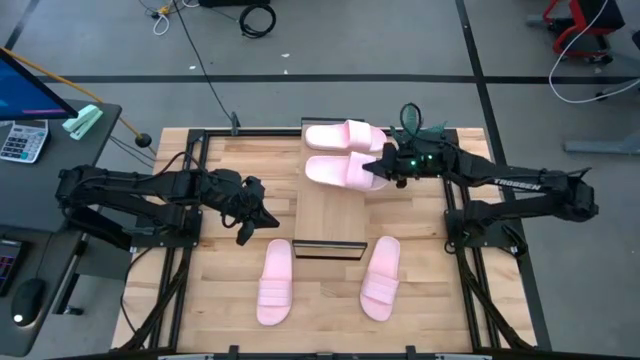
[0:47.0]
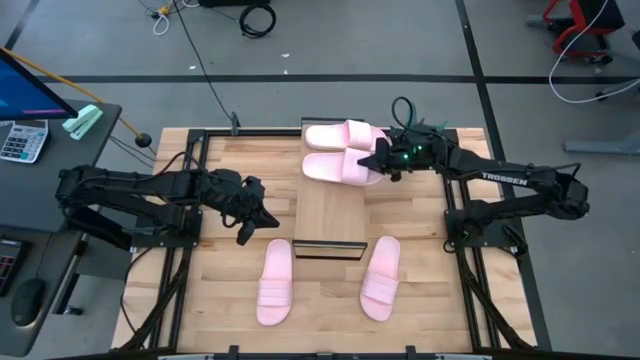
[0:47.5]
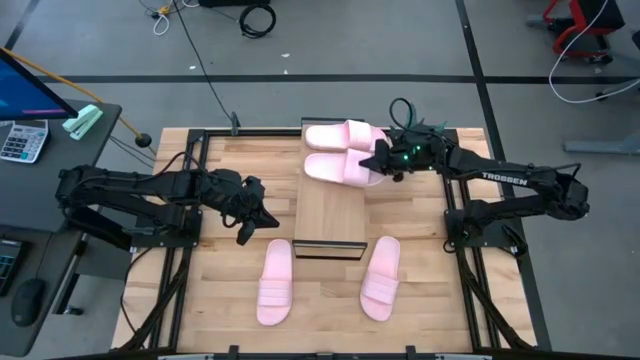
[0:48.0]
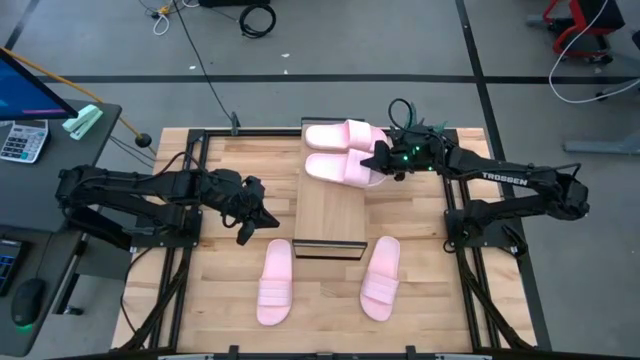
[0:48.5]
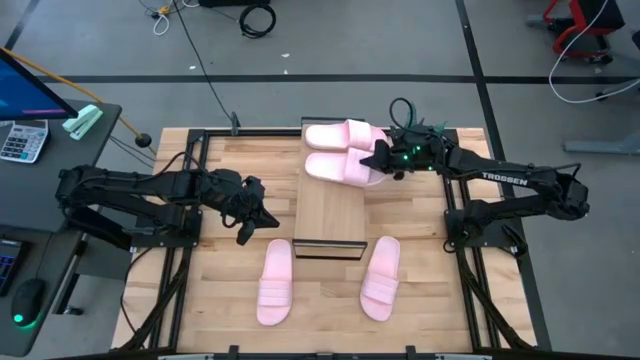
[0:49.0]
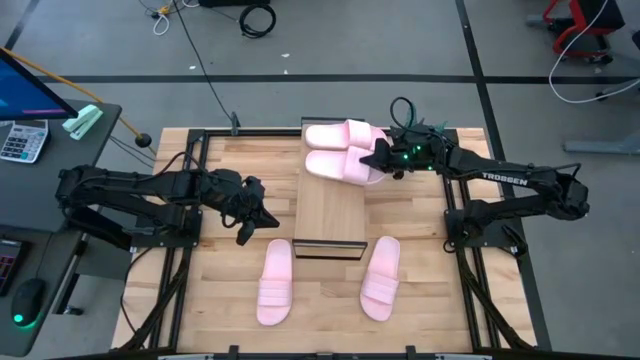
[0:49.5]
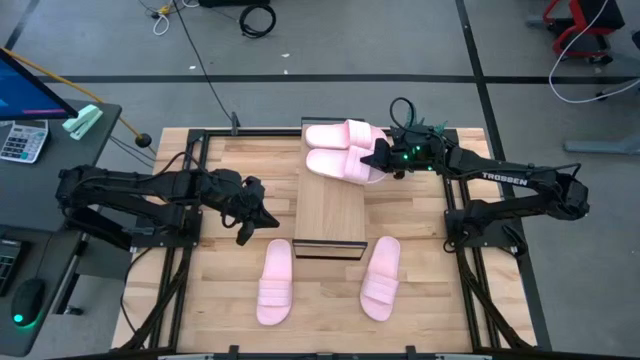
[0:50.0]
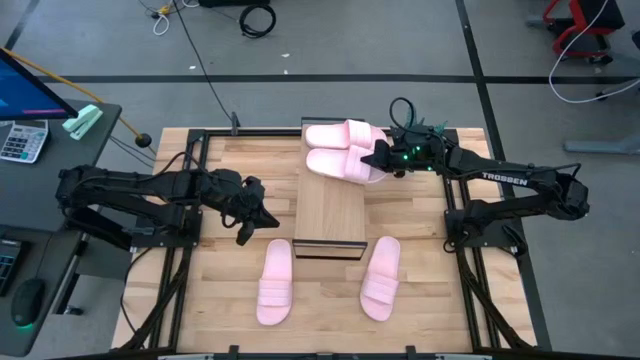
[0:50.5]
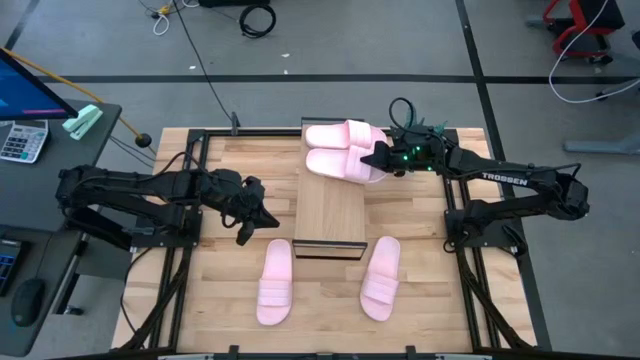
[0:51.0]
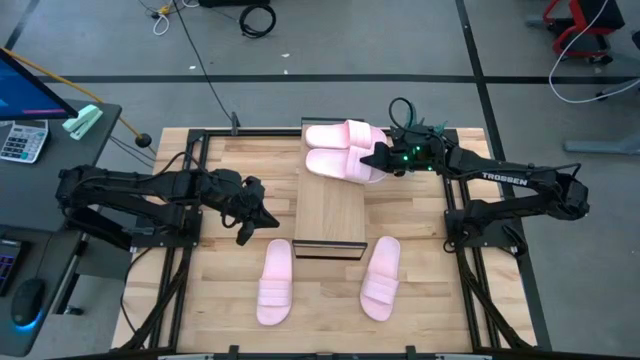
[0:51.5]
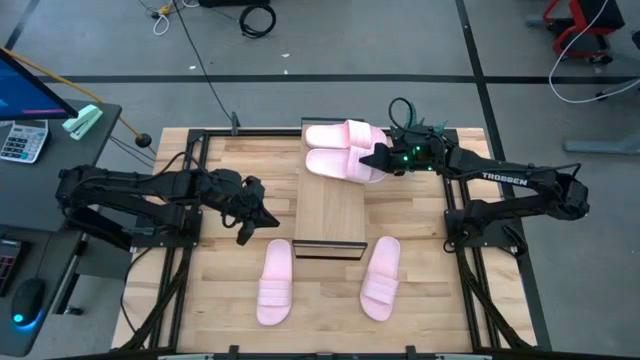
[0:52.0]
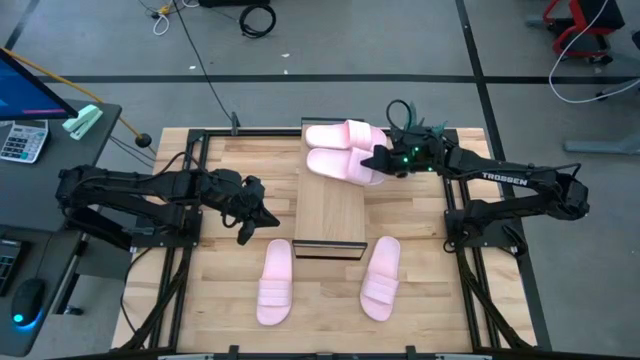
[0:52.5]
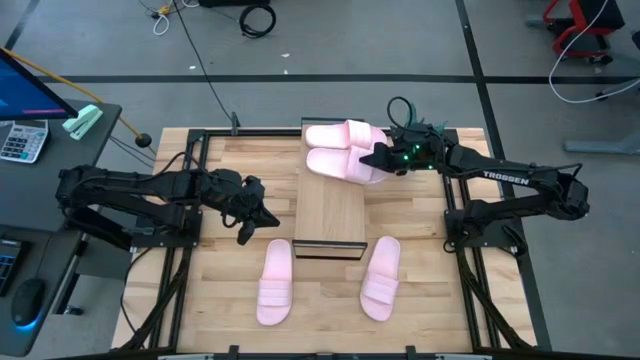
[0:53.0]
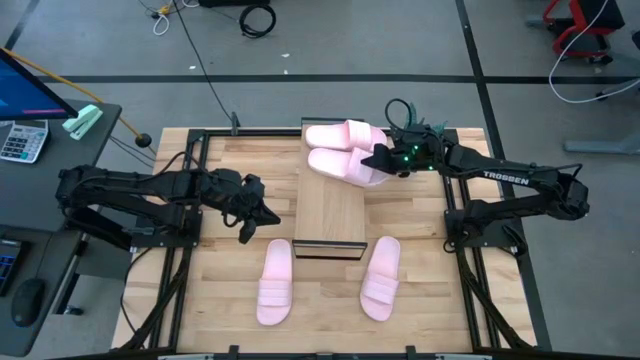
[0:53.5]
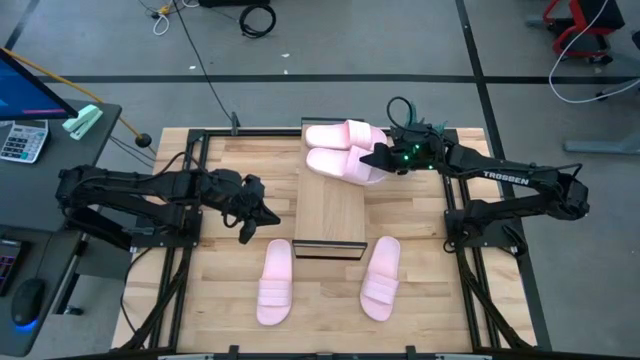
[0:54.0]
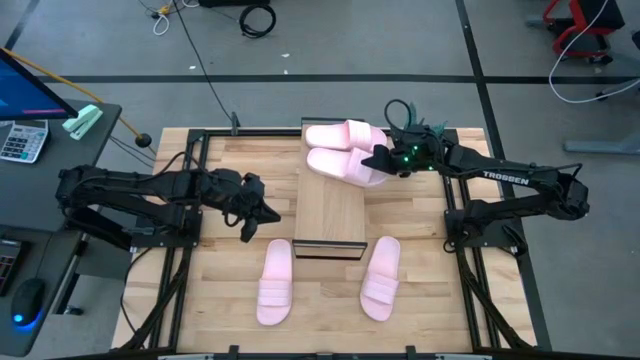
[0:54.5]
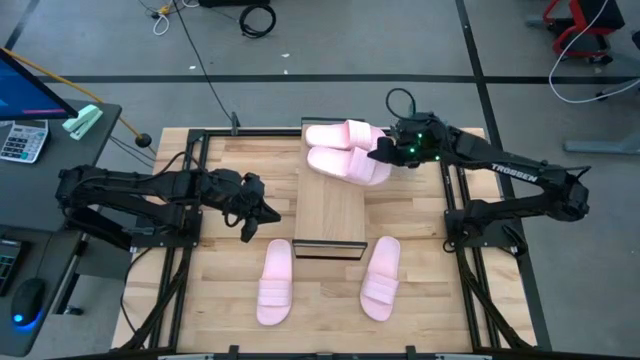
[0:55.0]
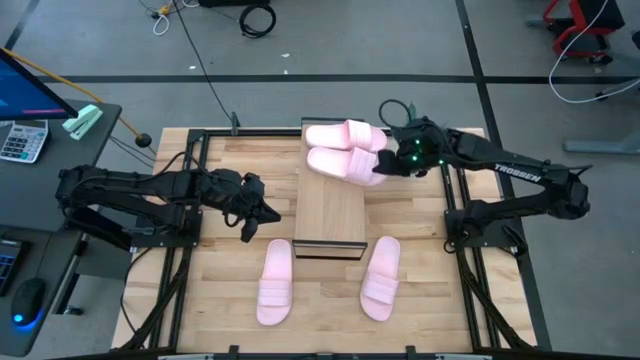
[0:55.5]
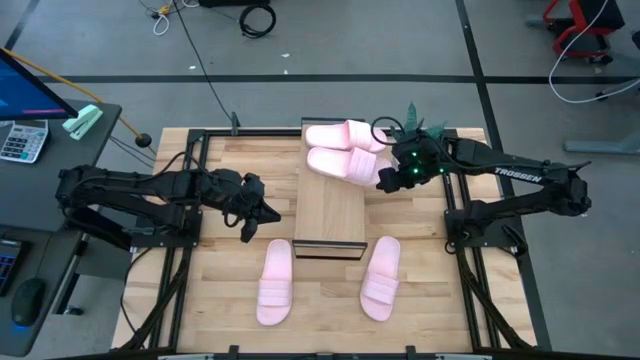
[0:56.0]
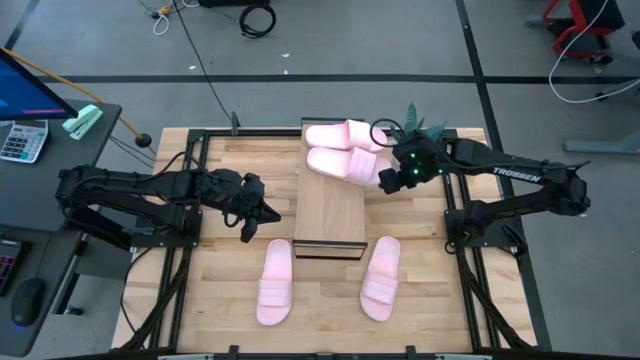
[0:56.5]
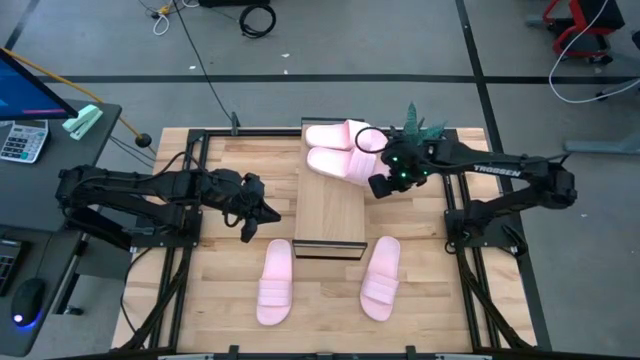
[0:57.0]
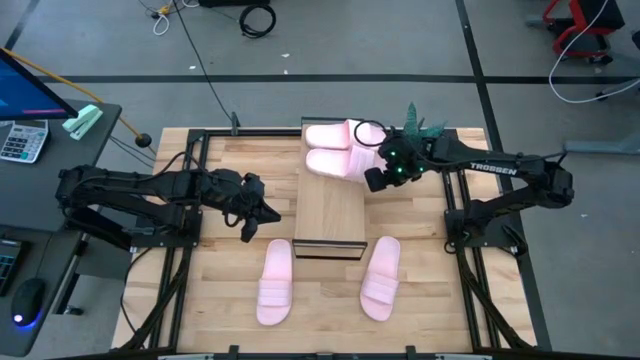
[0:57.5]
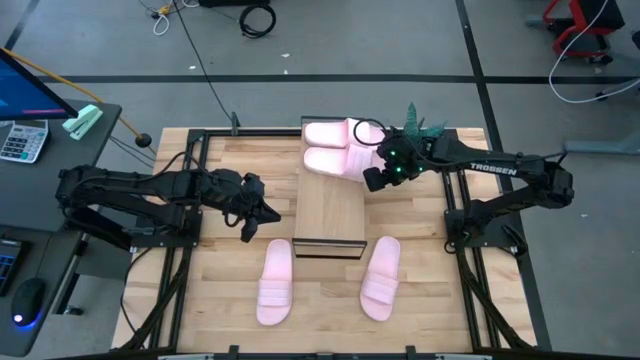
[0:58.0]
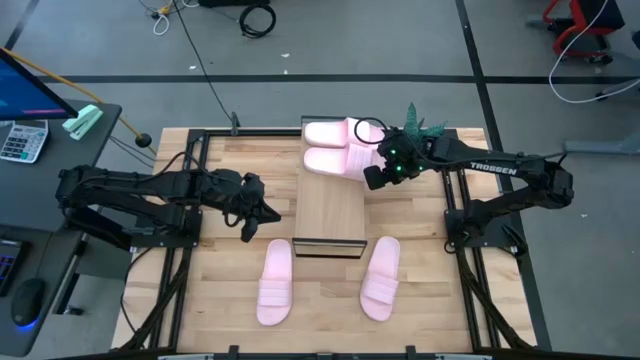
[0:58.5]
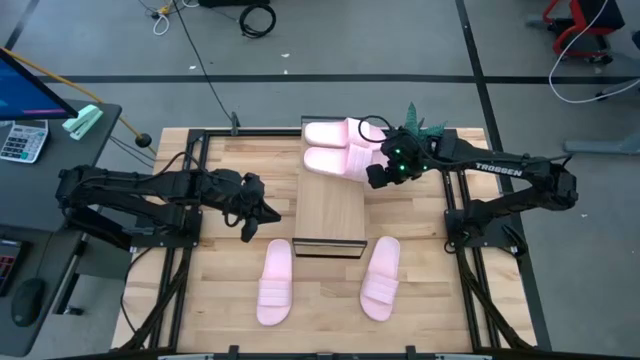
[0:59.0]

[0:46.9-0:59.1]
Task: Pick and place slides into the shelf
Put the pink slide on the shelf

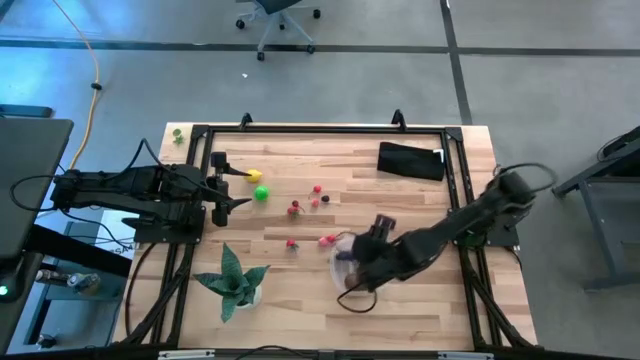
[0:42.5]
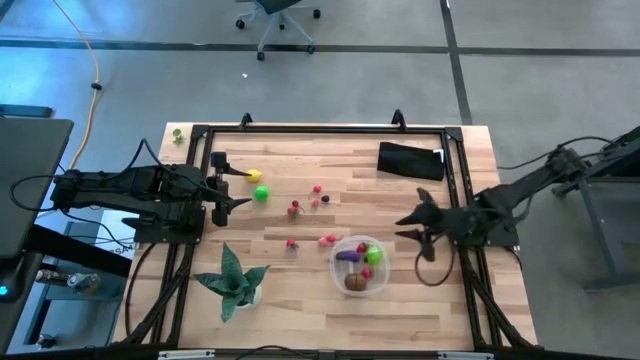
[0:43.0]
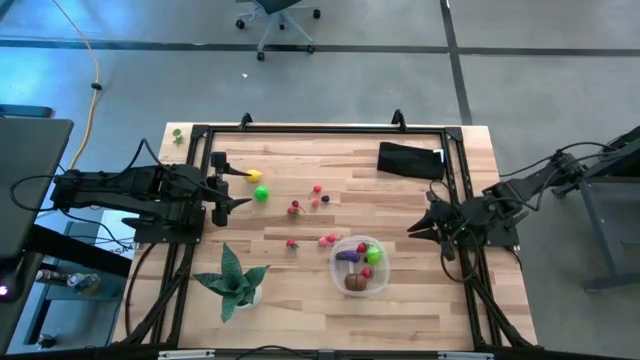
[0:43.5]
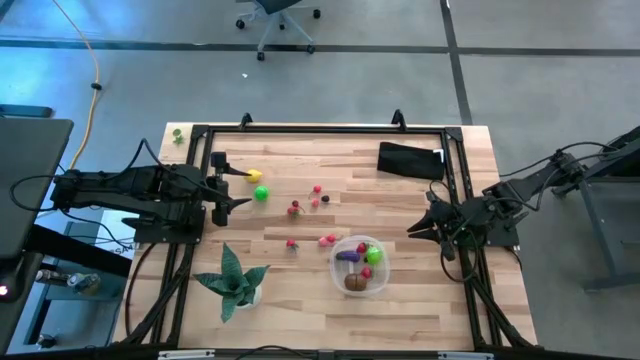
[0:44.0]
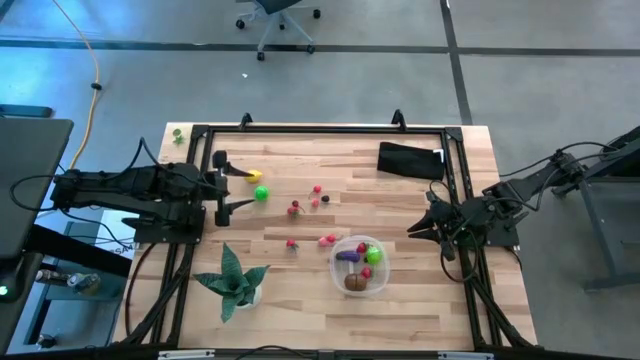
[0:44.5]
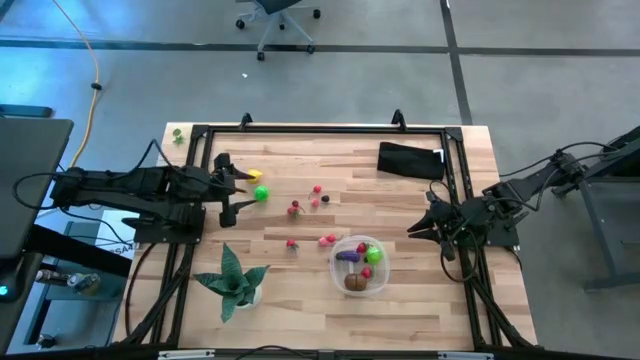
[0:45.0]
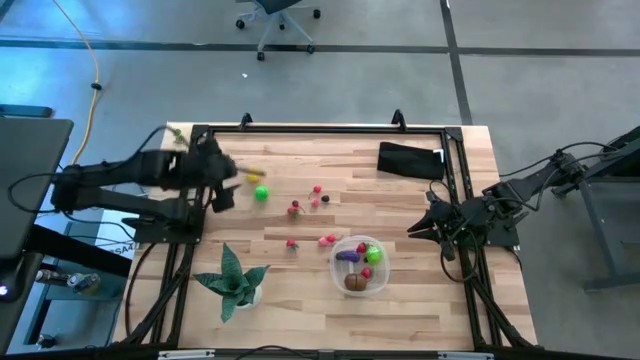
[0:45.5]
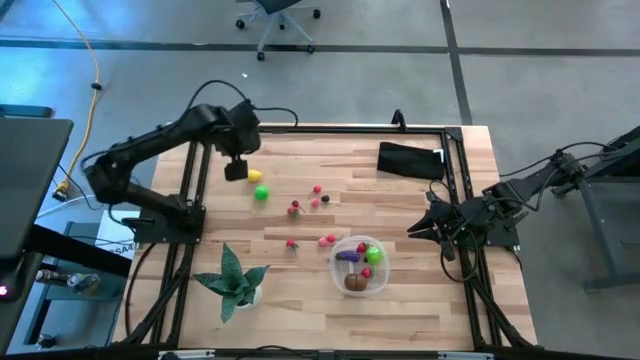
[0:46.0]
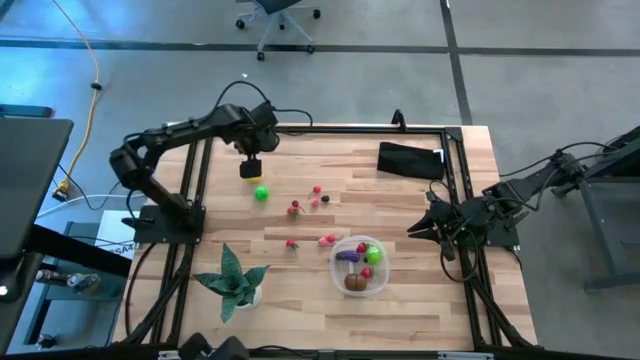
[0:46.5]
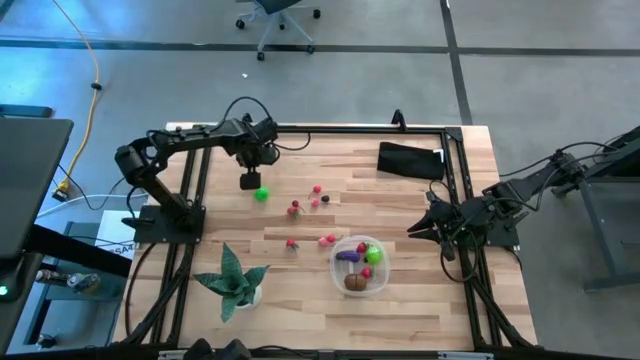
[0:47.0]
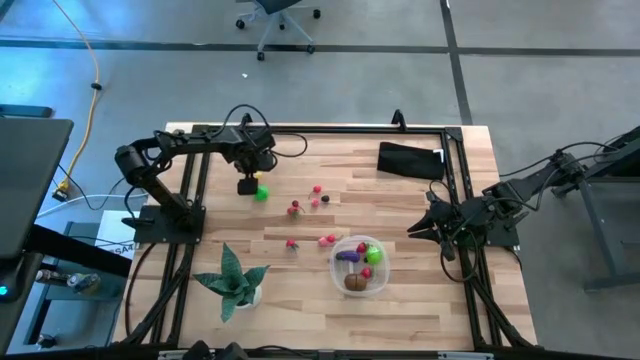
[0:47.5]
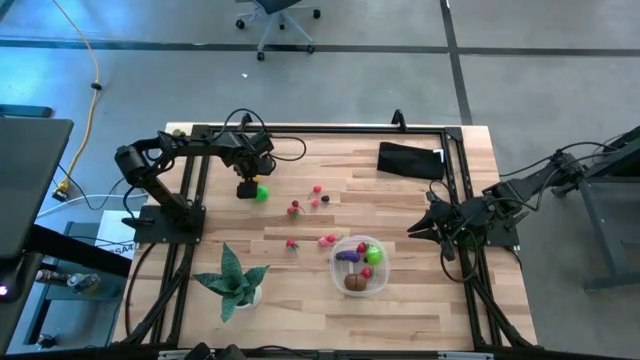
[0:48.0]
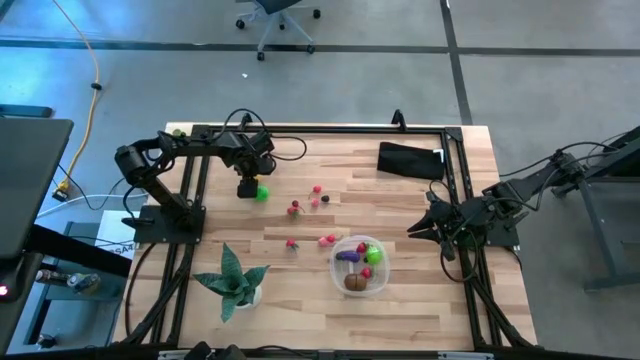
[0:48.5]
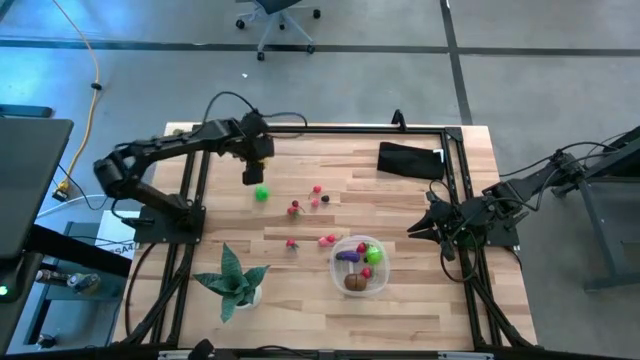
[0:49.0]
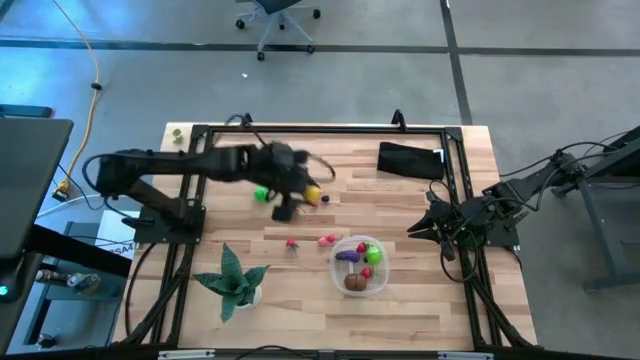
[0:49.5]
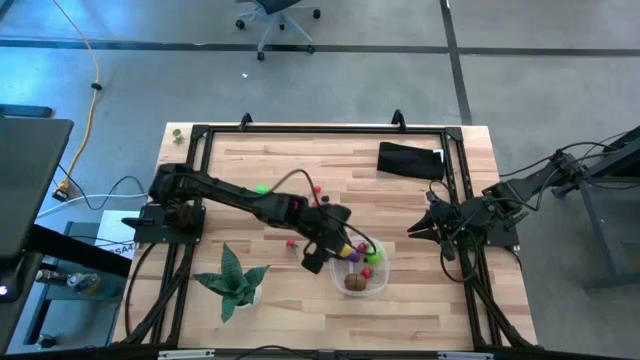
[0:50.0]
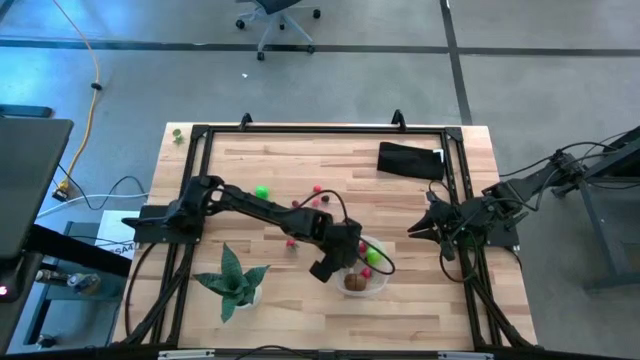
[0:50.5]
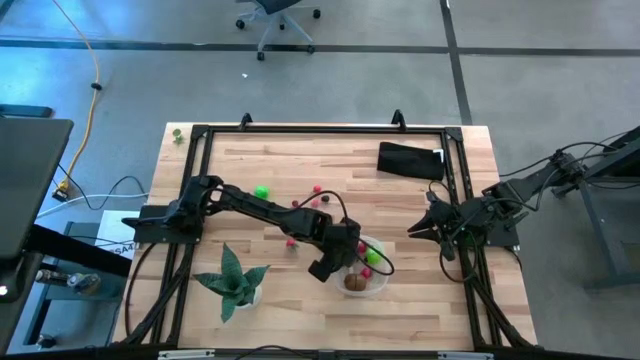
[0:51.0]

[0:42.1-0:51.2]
Task: Pick and placing Produce into tupperware
Put the lemon into the transparent bin
